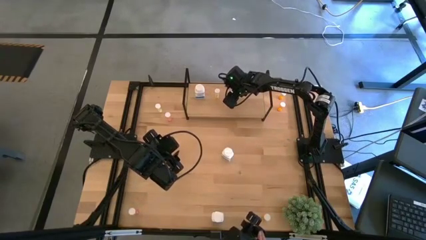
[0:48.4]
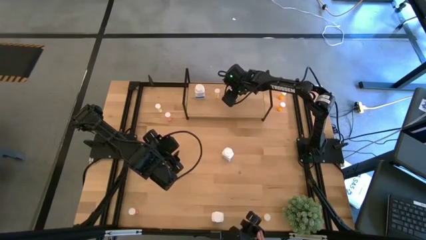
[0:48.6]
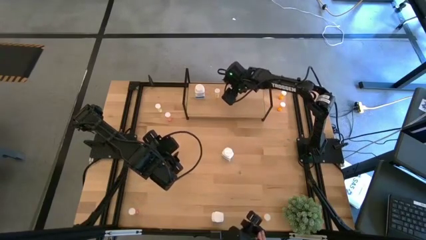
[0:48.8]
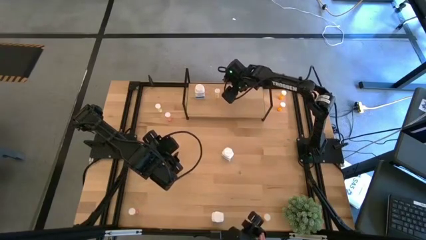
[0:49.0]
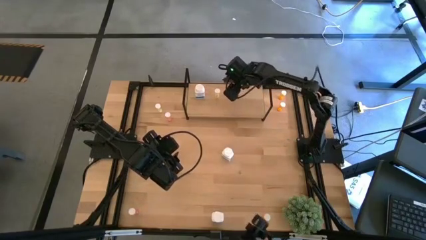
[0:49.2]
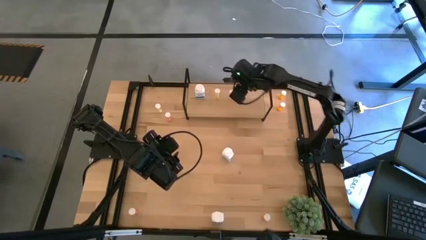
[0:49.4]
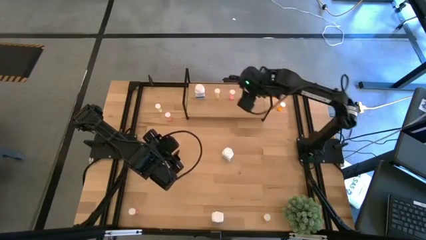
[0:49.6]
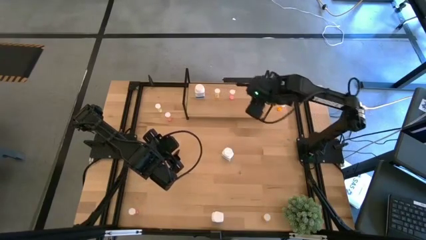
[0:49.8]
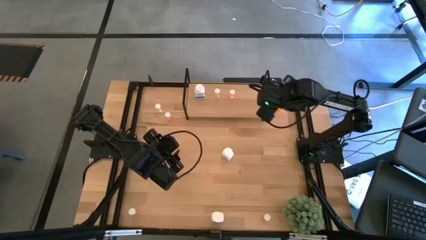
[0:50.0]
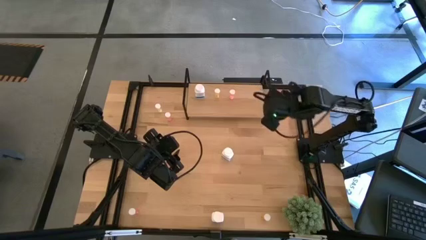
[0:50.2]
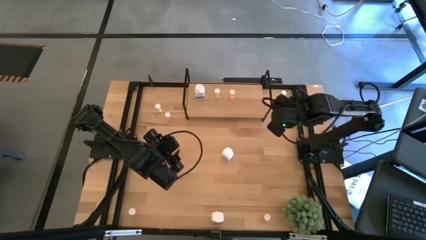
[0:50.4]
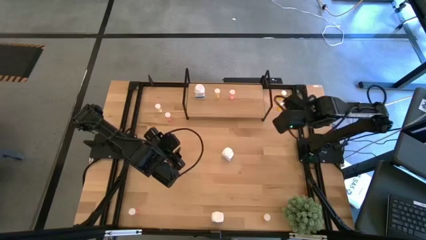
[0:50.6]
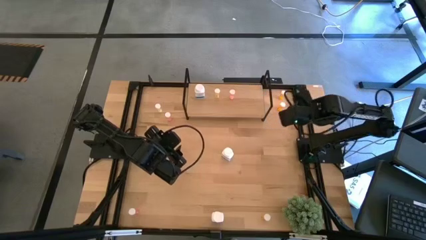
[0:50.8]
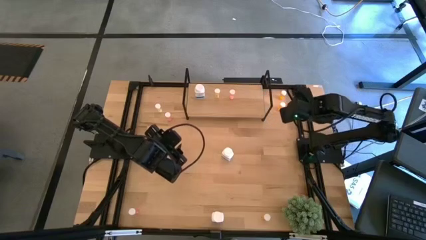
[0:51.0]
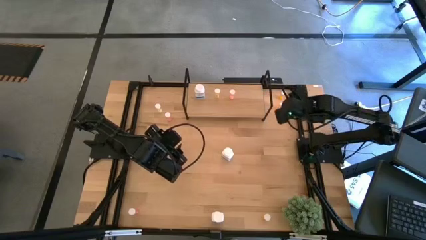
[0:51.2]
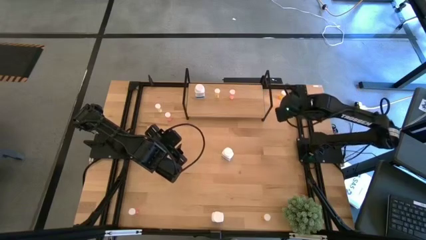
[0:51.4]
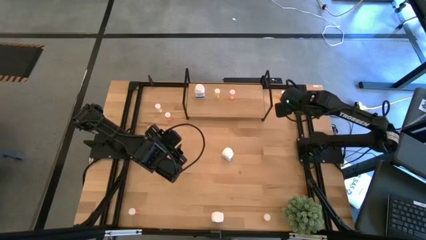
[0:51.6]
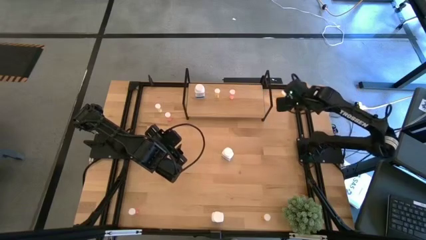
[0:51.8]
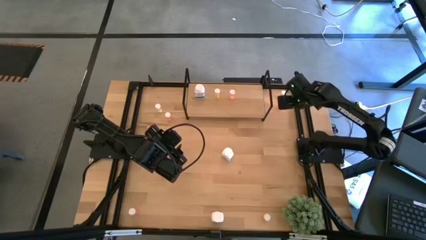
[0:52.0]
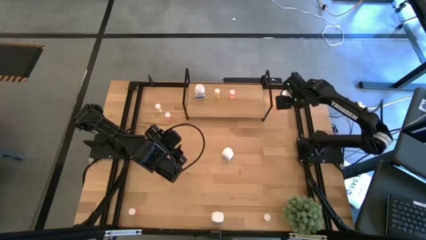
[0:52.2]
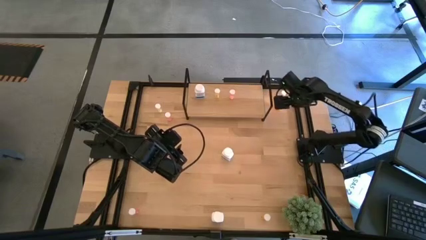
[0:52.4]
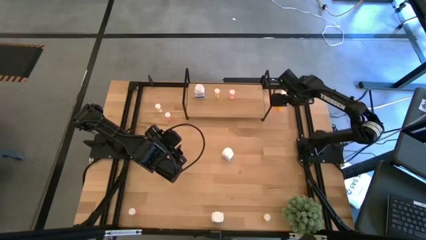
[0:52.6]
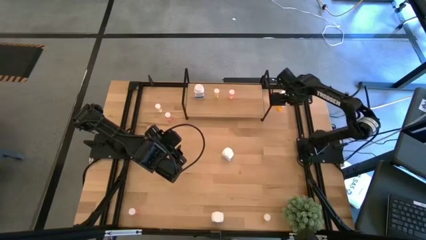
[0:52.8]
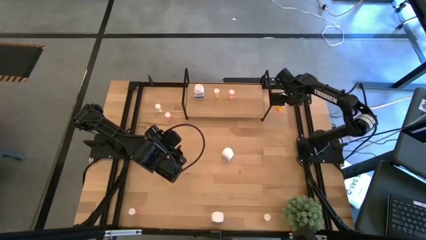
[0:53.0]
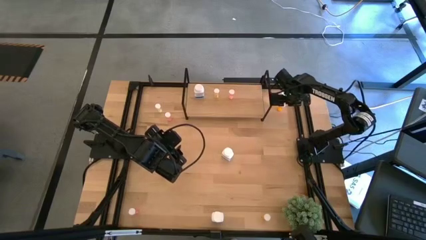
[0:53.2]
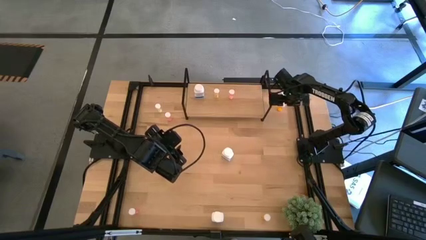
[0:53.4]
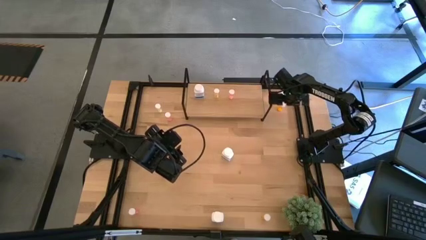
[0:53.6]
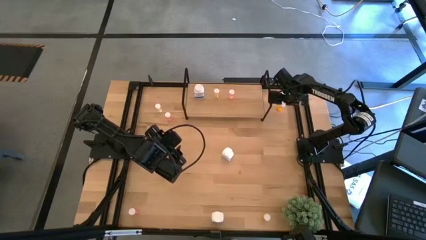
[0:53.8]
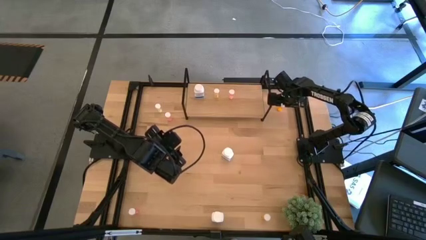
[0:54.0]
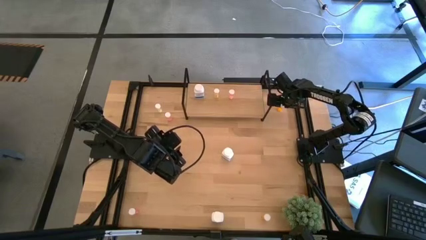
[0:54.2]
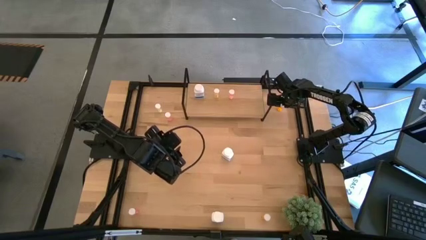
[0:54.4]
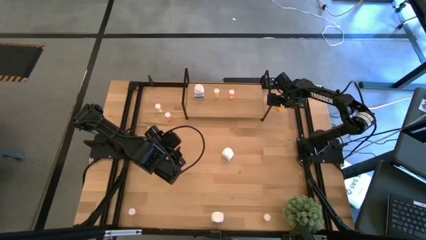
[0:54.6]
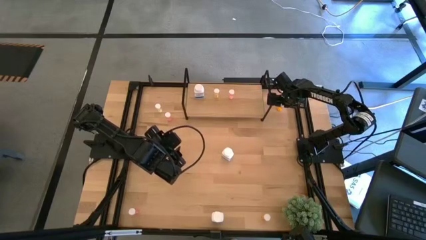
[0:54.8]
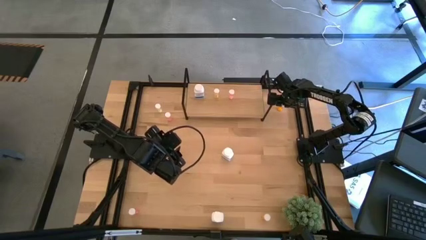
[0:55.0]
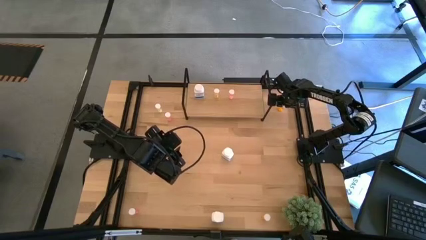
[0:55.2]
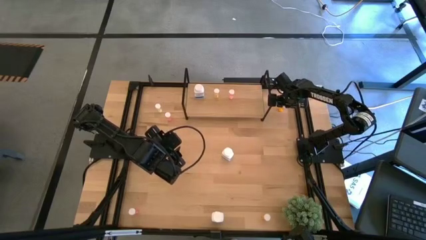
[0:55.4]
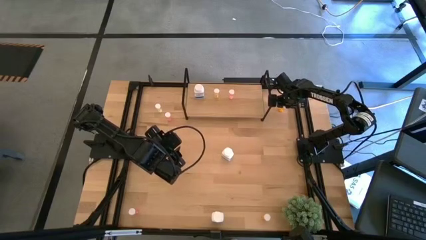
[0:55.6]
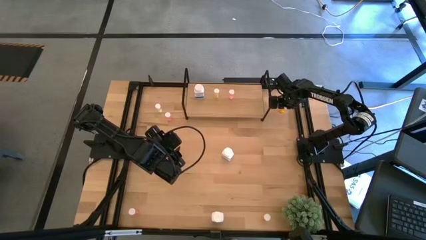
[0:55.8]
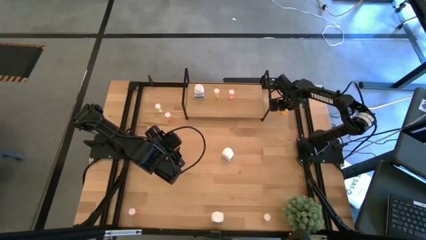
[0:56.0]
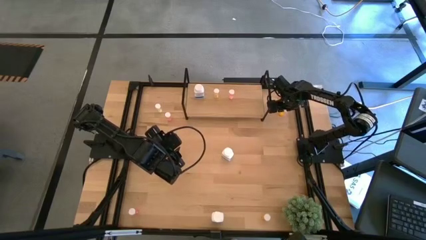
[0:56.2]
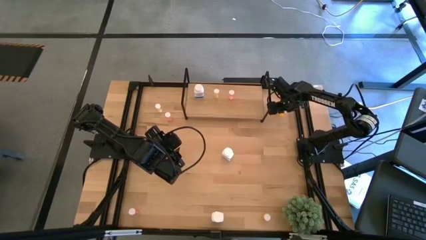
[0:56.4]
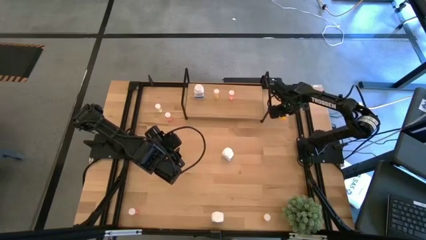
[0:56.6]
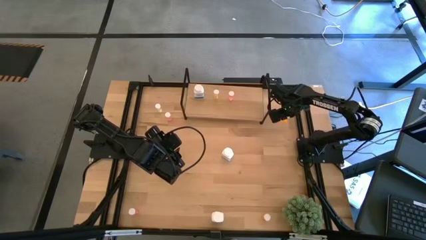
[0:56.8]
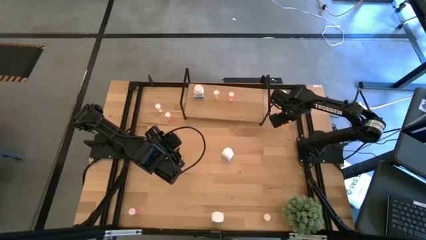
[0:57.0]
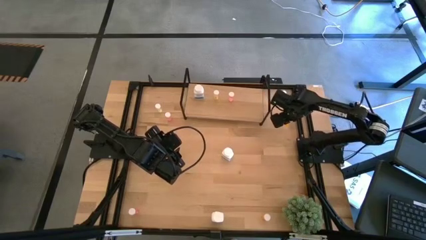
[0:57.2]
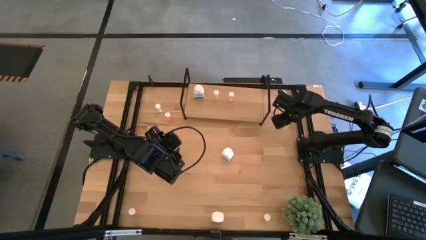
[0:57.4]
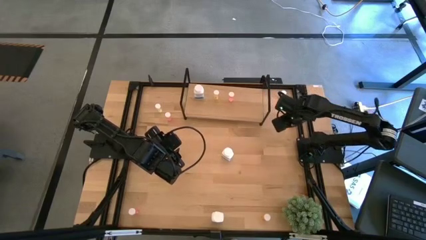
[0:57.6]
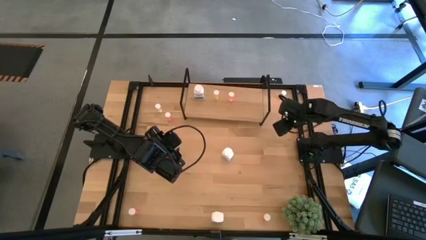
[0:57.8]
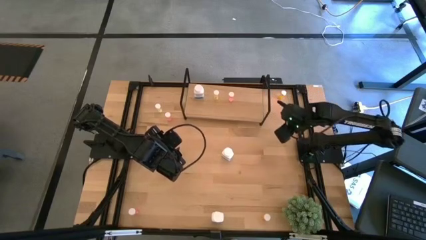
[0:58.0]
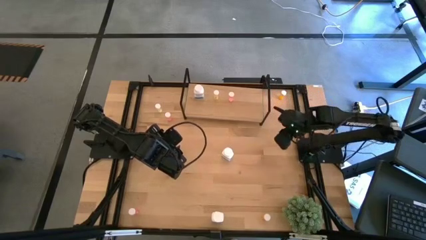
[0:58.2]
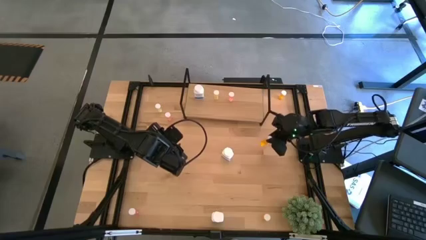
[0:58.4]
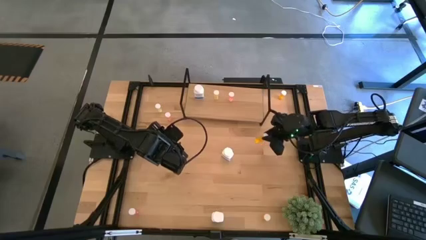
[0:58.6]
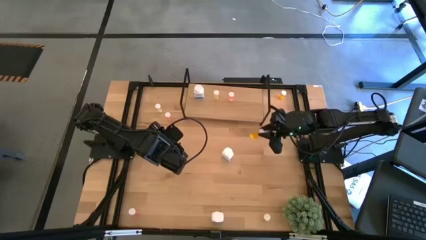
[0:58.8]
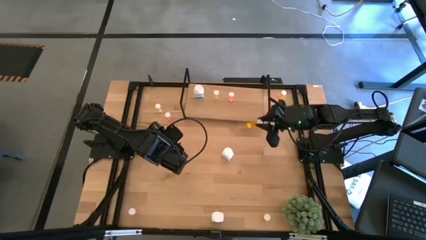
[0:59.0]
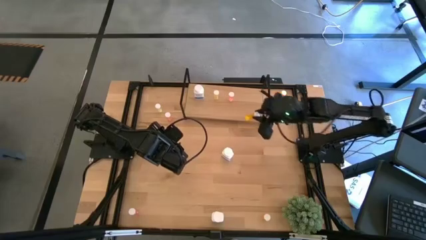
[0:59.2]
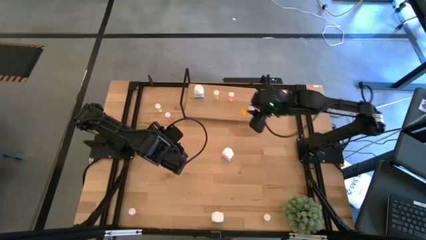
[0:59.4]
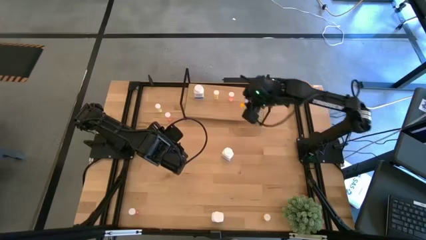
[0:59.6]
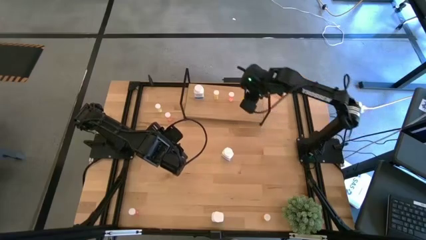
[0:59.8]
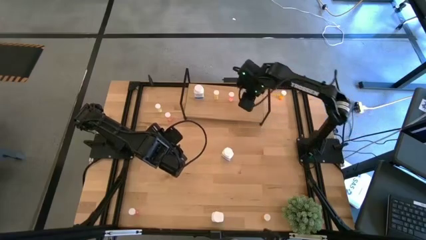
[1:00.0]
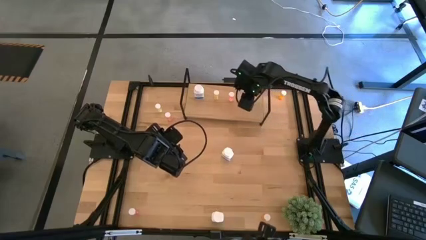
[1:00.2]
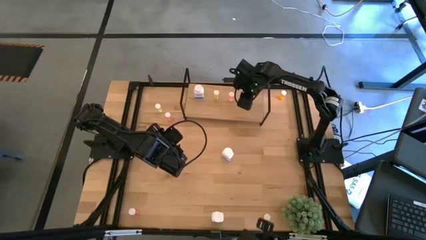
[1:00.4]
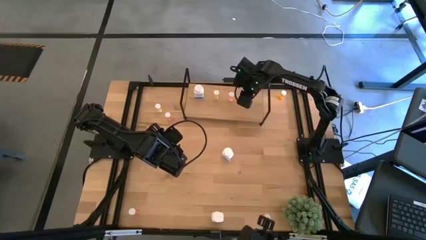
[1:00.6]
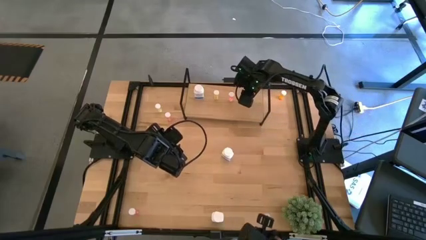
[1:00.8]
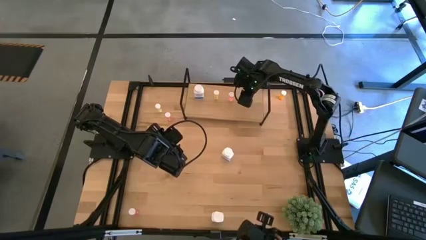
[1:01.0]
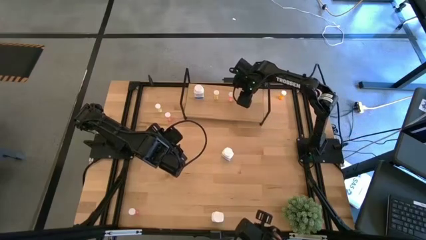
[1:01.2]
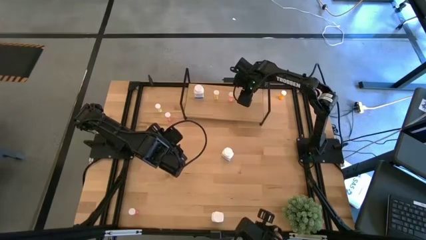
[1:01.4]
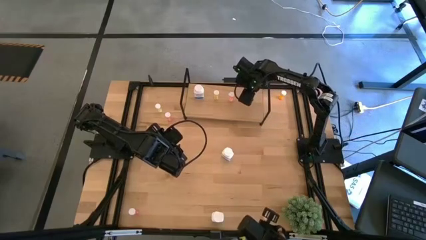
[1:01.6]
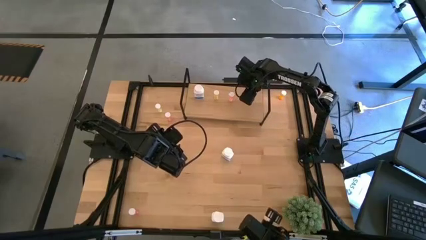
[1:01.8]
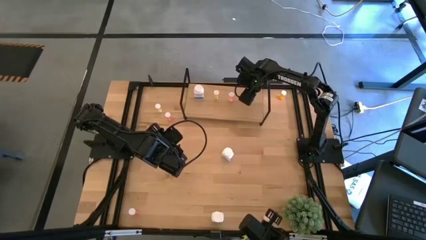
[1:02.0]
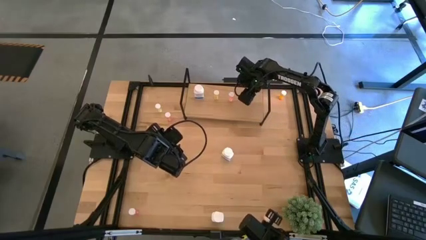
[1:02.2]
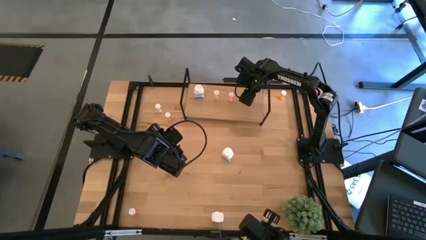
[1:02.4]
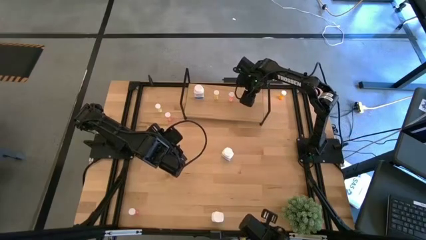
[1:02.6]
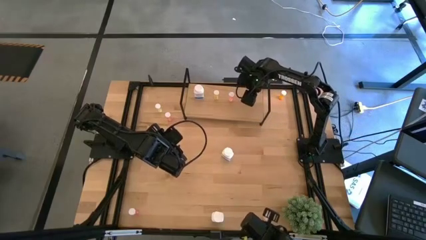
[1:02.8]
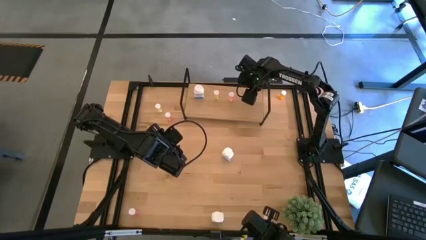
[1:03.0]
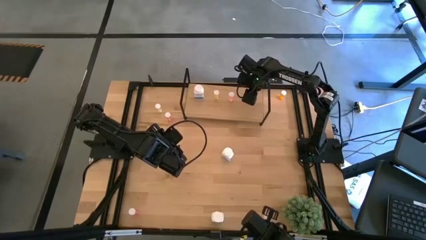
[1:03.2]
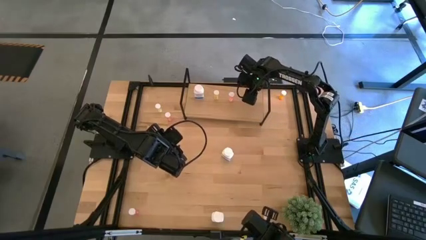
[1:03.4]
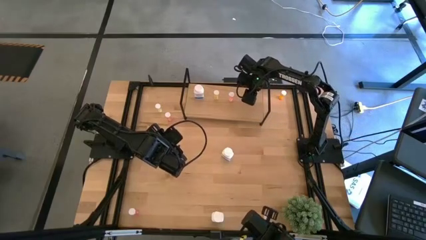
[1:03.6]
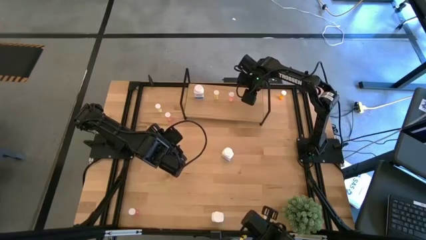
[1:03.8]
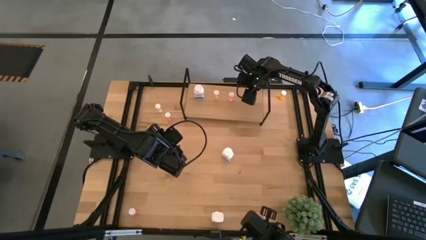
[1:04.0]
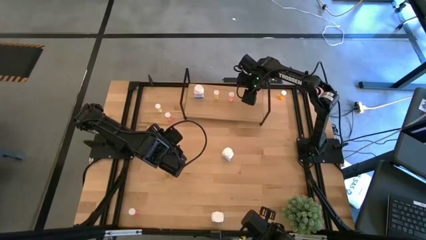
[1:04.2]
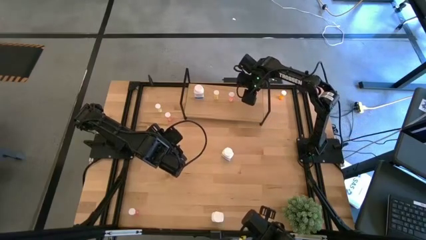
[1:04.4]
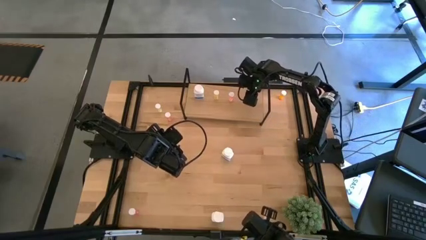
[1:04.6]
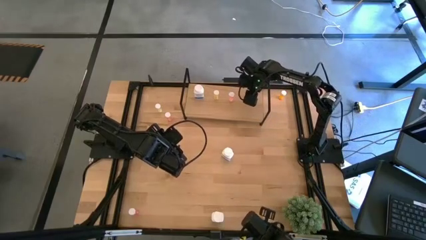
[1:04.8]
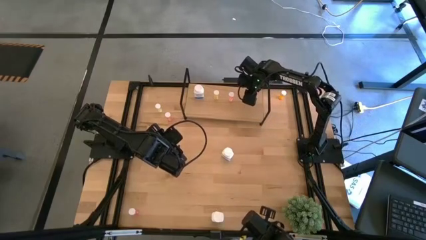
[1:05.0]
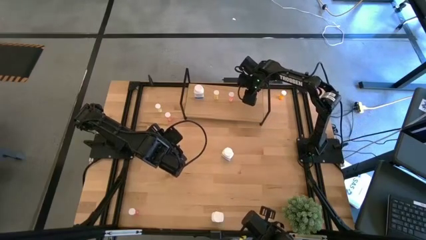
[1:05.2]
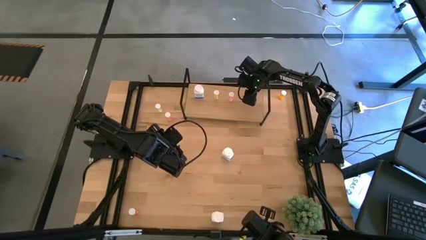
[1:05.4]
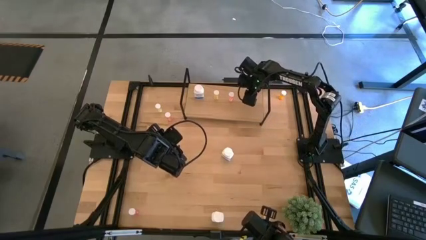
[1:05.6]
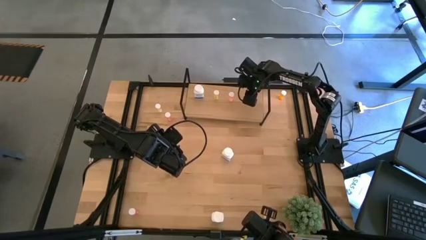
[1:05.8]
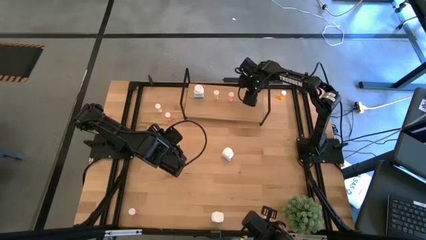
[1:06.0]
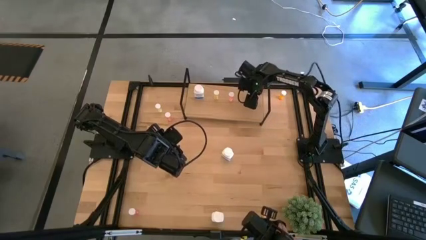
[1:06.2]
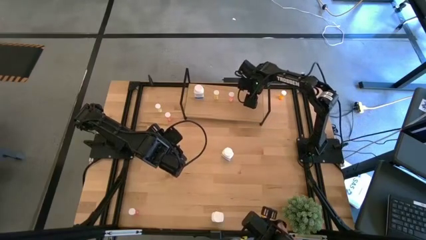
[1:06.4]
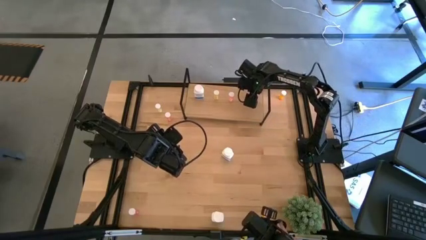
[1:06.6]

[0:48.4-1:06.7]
Task: Pick and place medicine bottles onto shelf by color
Put the middle orange pill bottle on the shelf
